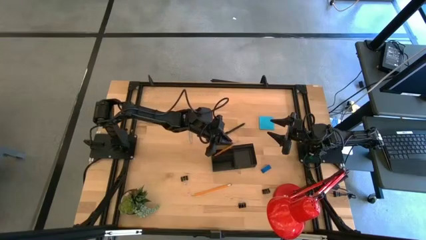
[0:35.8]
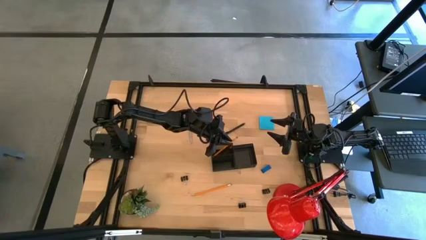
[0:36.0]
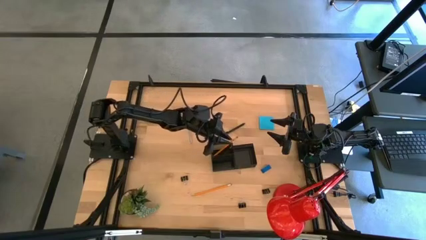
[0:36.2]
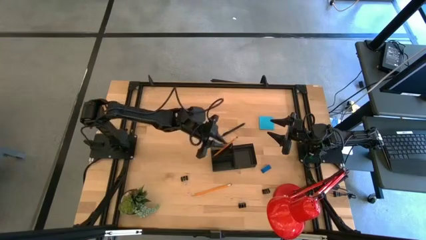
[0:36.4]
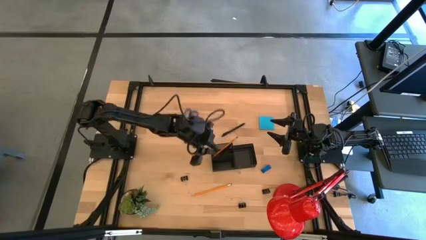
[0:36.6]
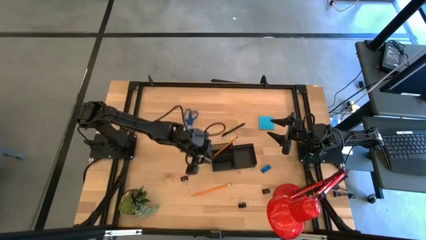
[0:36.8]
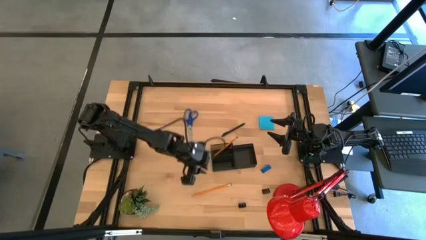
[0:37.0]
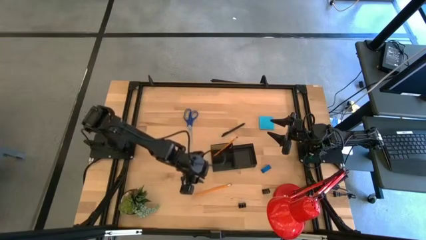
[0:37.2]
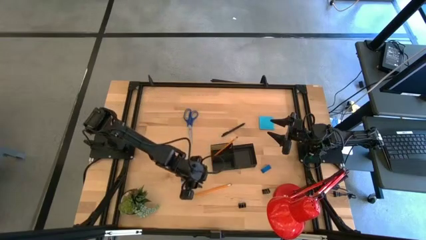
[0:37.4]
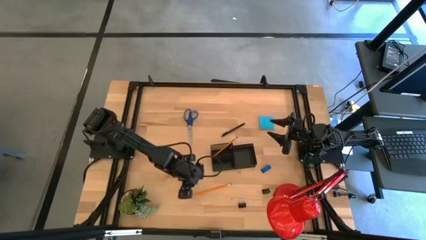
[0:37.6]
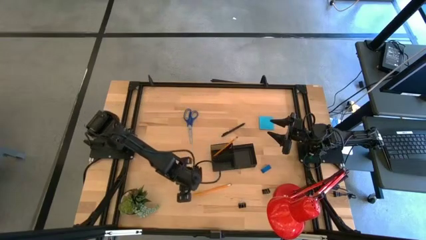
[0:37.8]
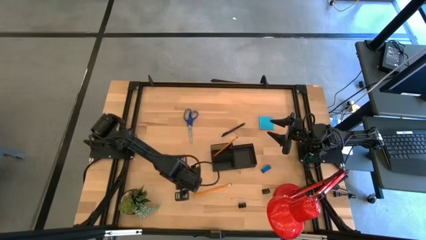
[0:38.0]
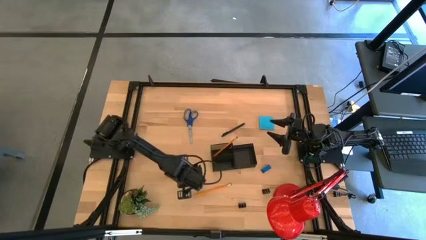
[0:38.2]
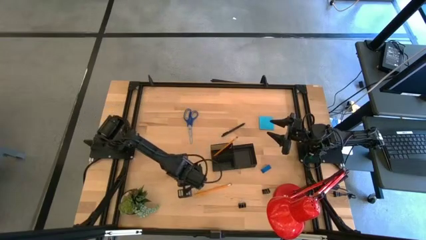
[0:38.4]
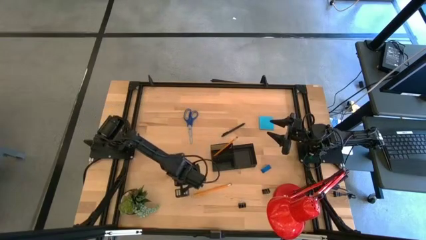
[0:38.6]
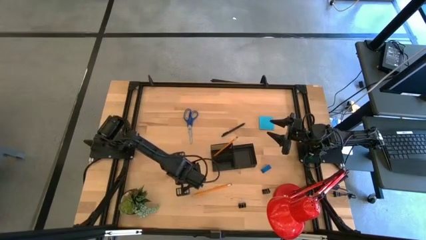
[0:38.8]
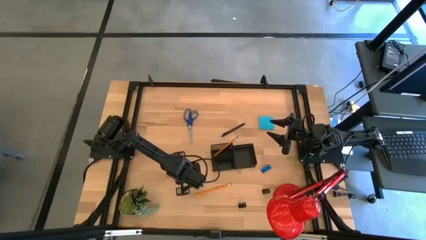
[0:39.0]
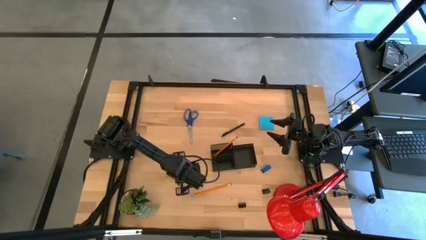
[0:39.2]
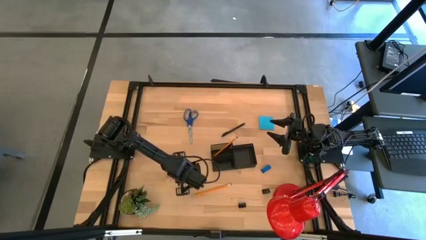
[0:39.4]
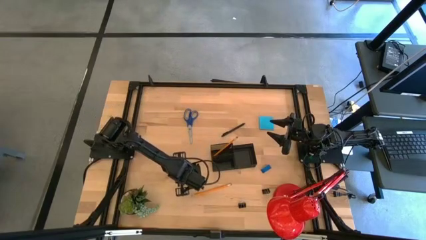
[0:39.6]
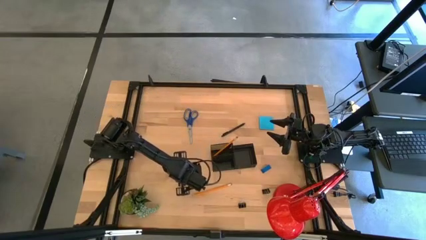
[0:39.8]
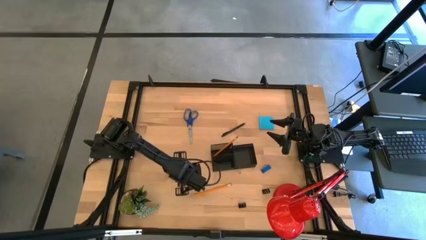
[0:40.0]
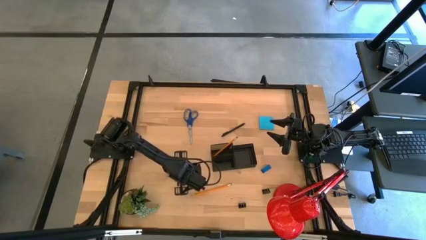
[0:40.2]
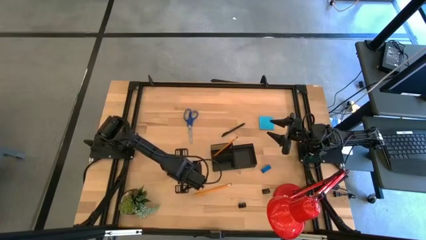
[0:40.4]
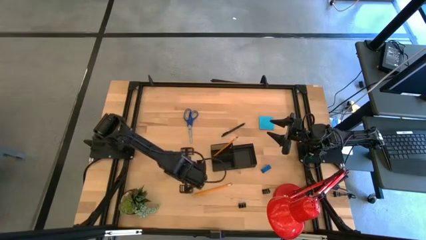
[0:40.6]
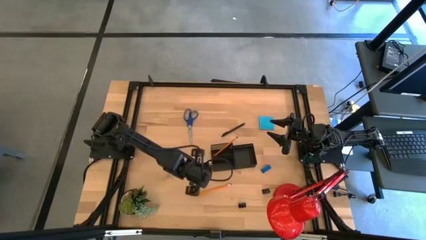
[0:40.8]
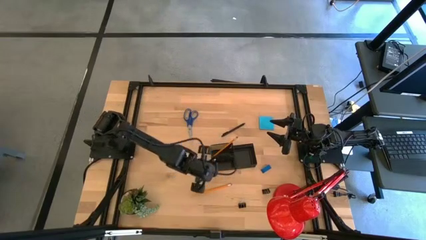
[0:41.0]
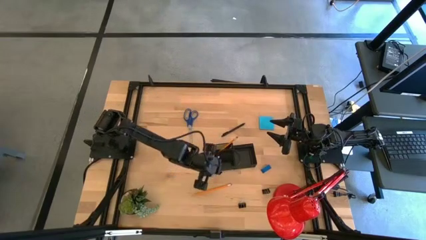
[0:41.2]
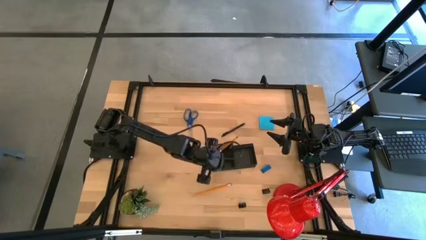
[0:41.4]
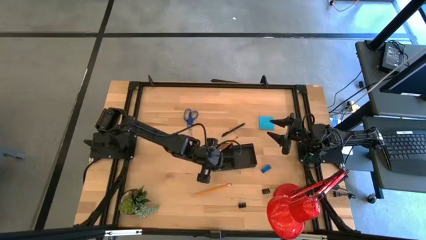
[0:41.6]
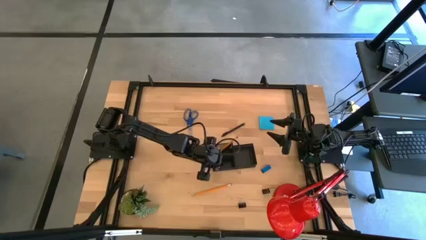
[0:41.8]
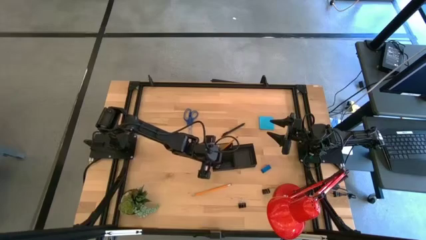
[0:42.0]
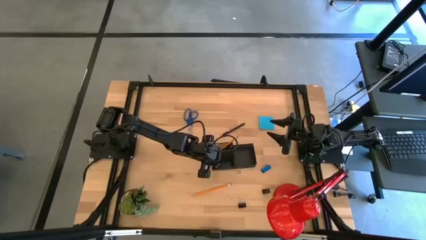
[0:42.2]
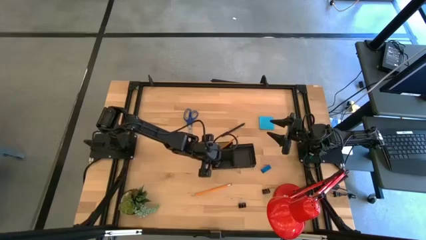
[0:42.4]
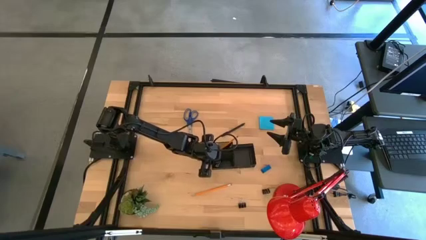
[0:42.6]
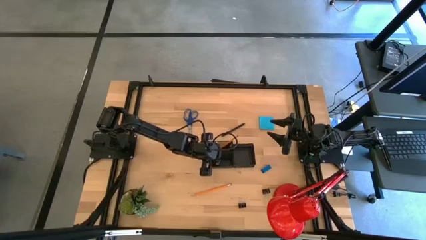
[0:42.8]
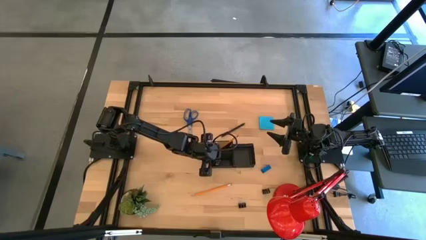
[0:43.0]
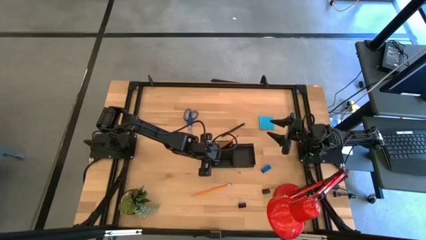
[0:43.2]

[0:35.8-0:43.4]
Task: Pick and place office supplies into organizer
Put the top left black binder clip into the black desk organizer

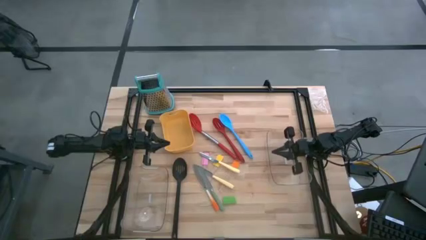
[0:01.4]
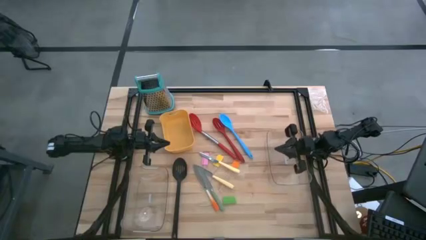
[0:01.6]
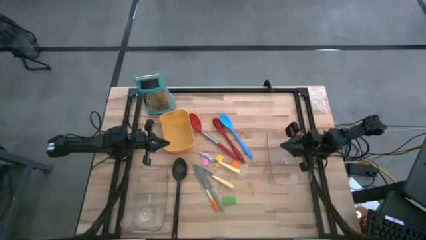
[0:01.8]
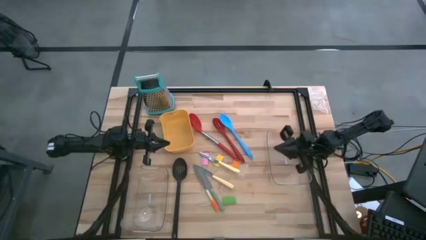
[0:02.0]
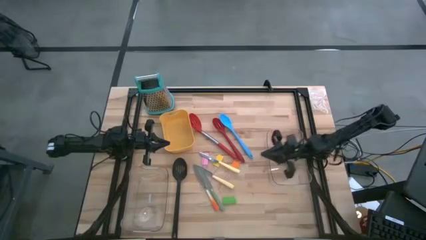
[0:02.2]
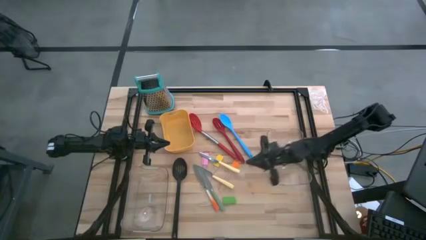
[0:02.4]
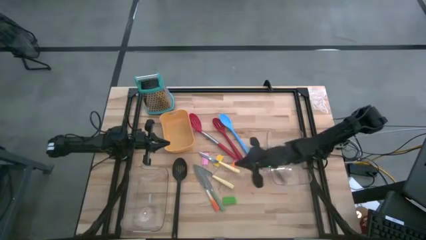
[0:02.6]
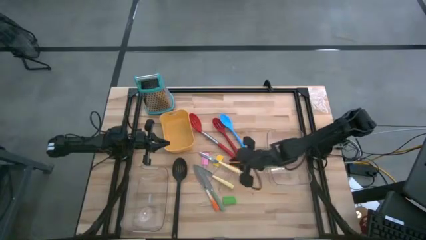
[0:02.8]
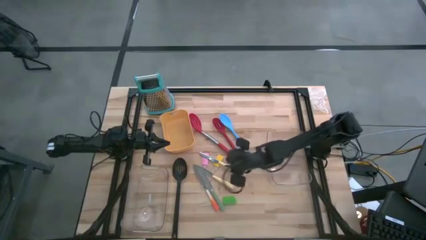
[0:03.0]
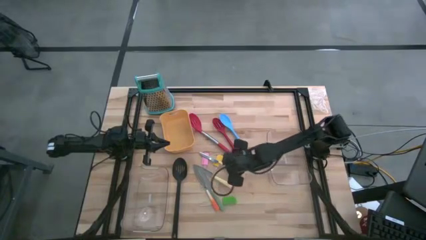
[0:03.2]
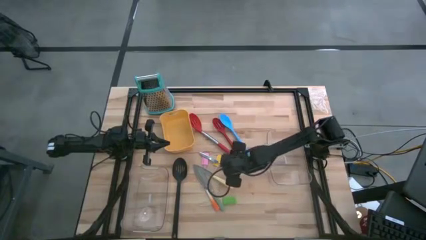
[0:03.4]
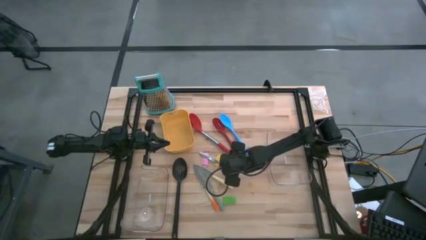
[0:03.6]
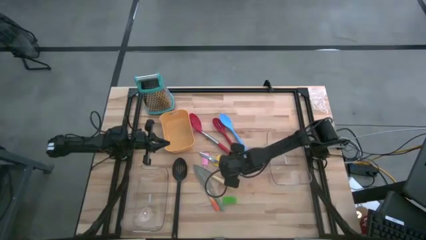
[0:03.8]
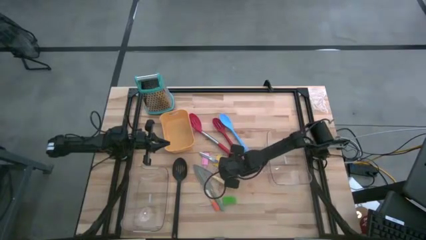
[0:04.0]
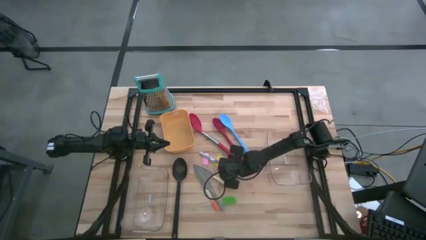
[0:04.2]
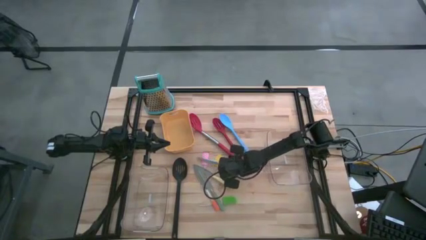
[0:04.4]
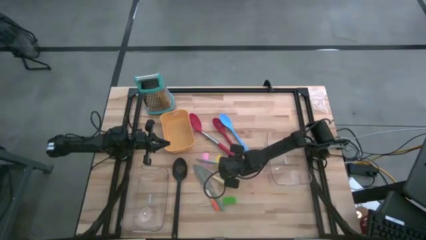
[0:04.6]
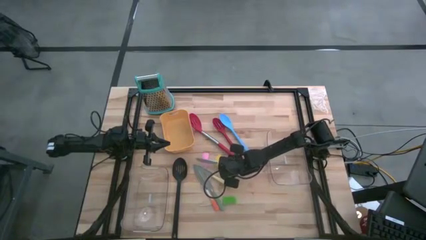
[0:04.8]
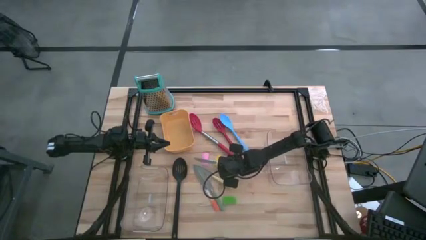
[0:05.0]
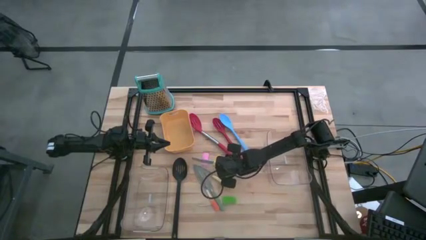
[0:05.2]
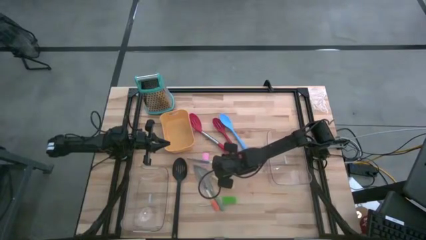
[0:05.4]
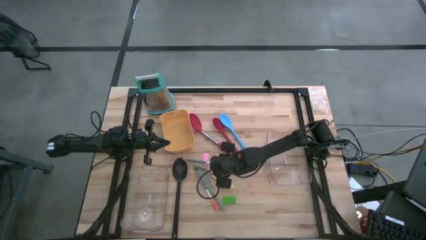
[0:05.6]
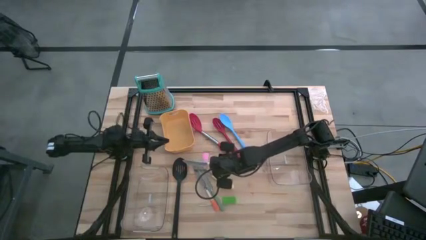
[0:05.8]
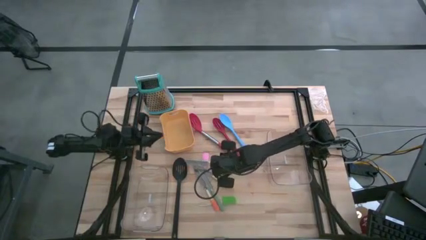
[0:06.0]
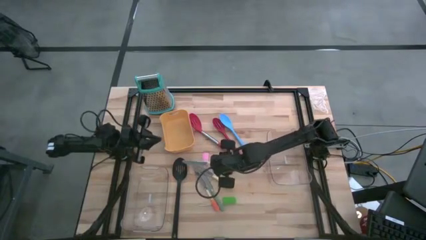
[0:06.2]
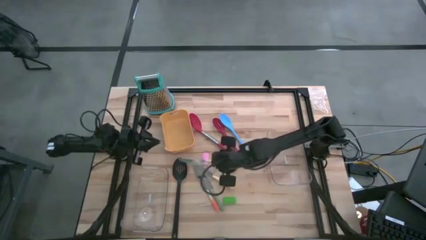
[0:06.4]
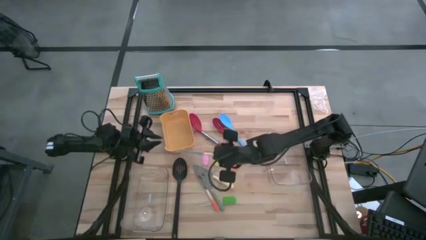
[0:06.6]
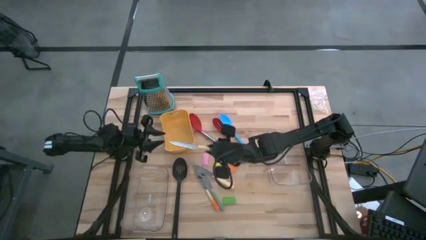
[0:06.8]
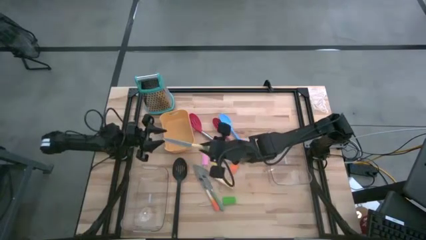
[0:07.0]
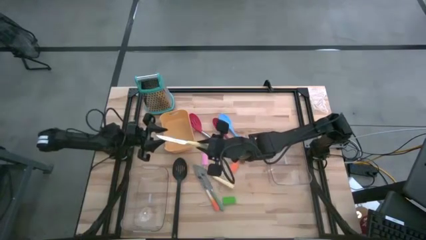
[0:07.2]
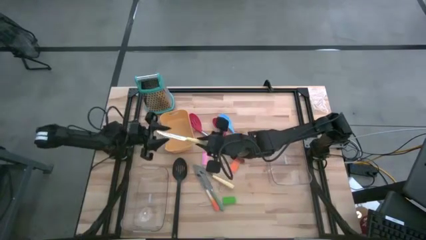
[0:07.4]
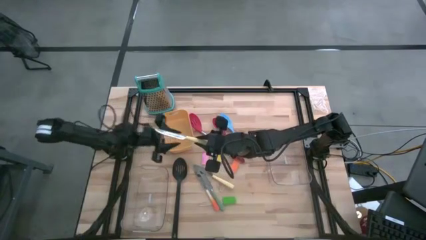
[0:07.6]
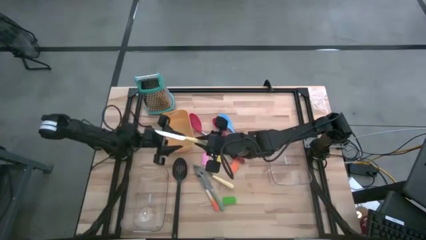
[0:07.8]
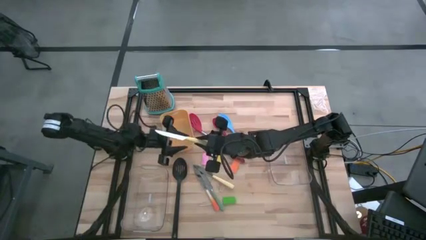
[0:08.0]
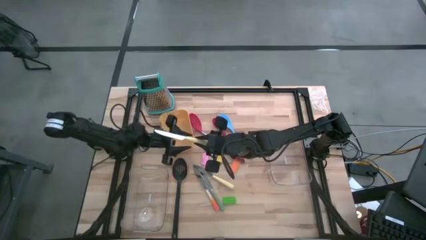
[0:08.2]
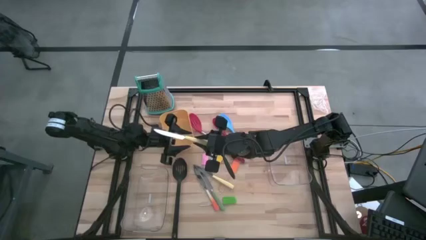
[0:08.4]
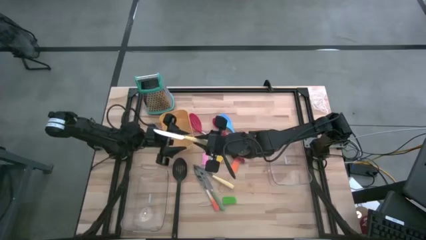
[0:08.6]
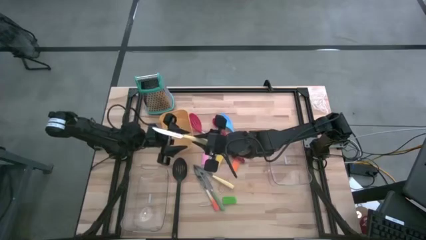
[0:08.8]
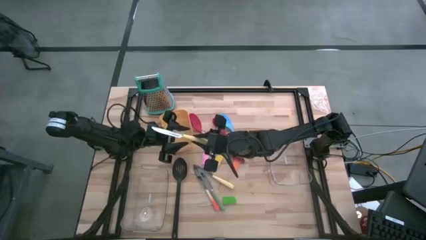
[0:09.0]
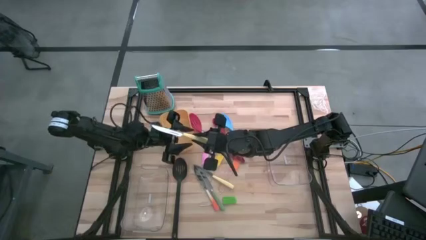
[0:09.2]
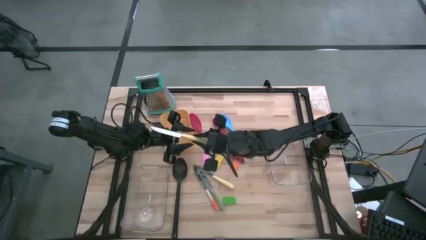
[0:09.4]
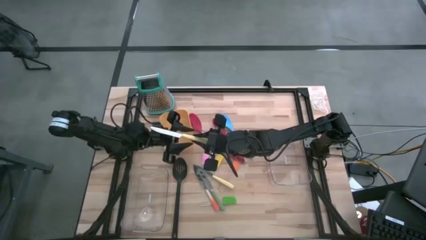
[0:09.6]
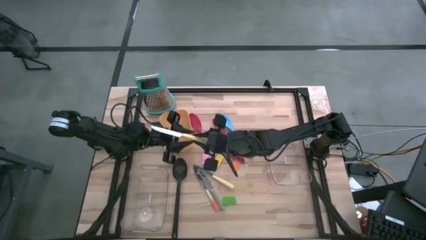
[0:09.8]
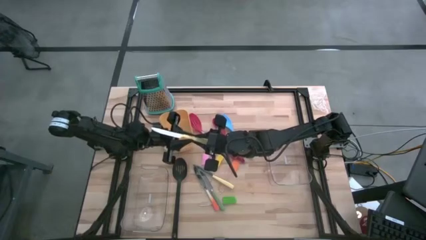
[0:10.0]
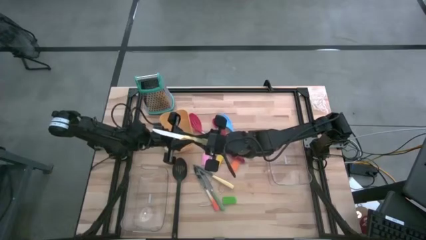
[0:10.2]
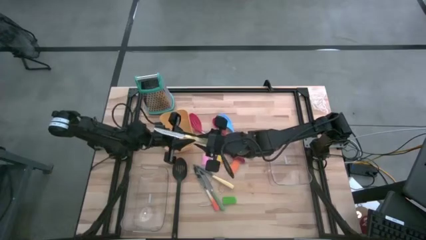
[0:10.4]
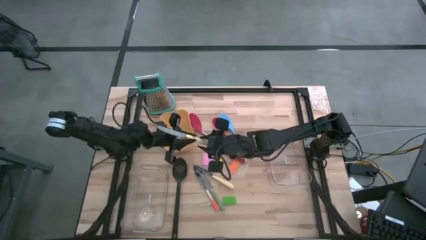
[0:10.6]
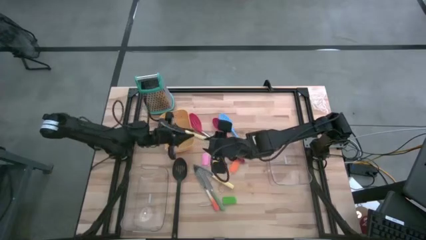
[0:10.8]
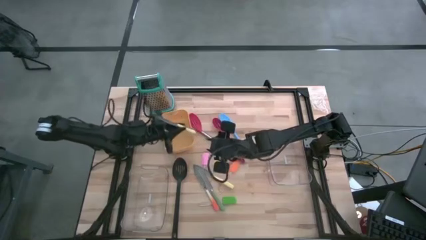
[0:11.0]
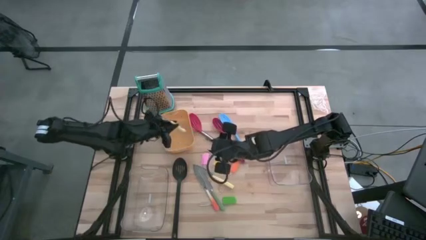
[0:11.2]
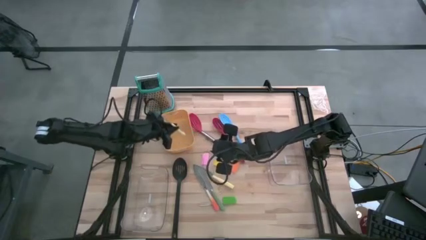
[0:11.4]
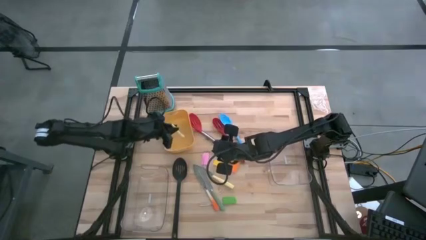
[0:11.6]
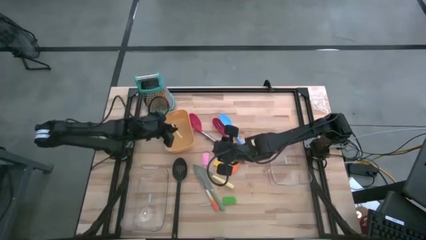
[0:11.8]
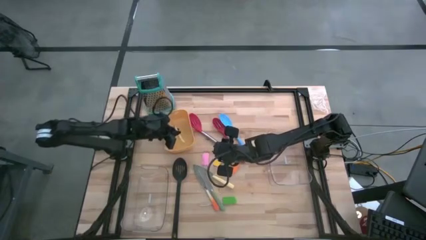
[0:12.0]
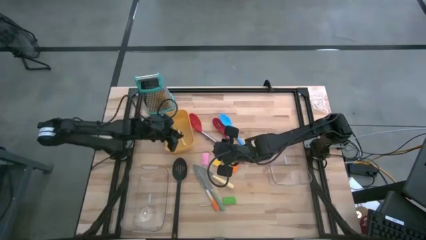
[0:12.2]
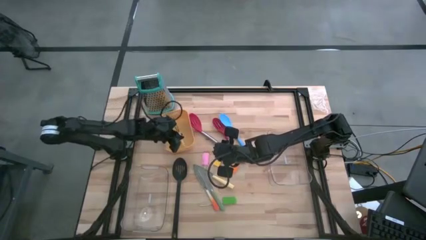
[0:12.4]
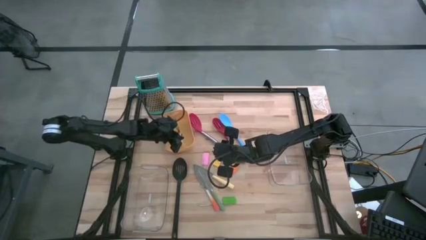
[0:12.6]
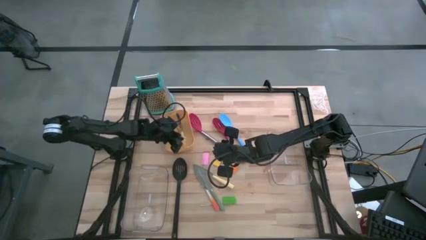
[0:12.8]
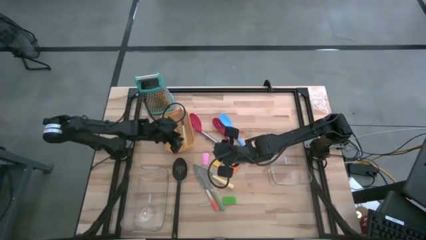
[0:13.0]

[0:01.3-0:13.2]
Task: Pick & Place Kitchen Items
Put the top light yellow knife into the yellow bin
